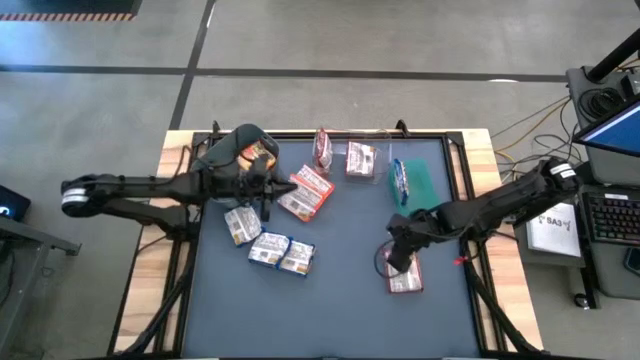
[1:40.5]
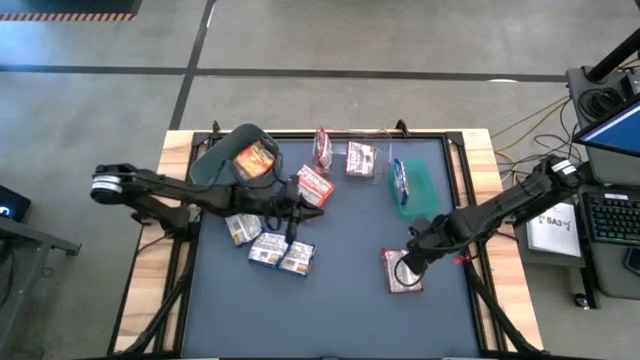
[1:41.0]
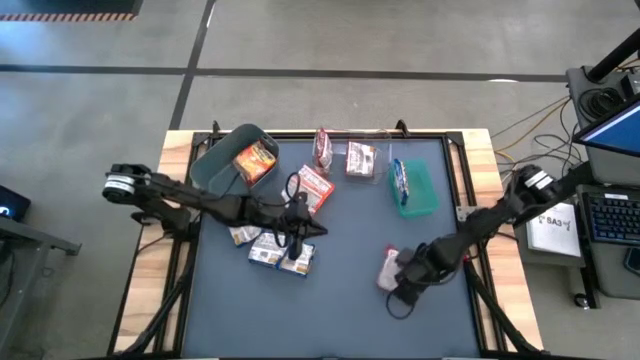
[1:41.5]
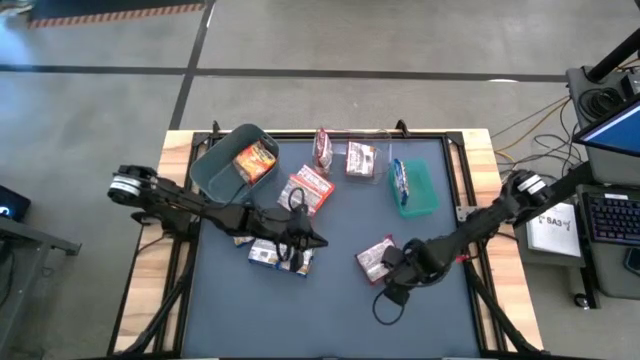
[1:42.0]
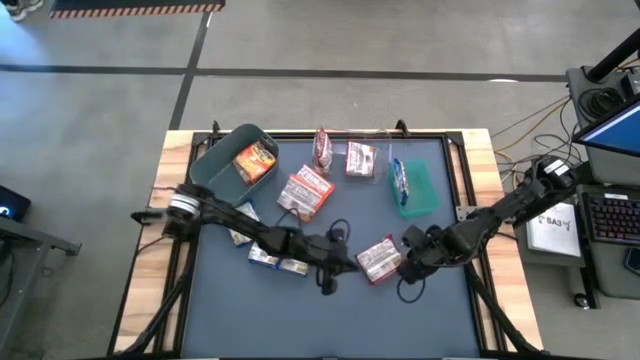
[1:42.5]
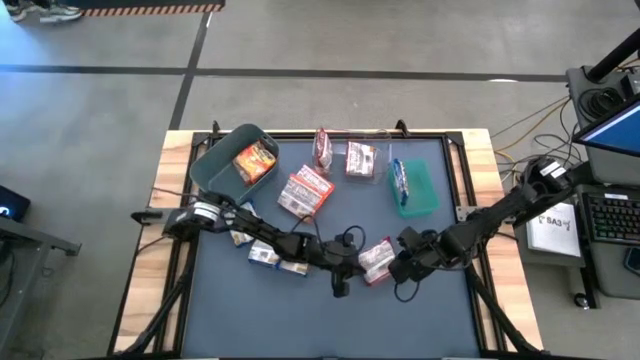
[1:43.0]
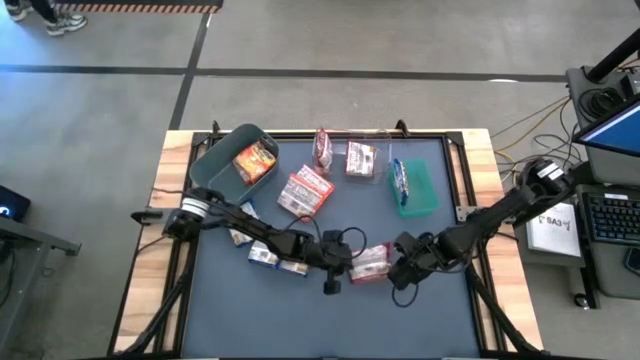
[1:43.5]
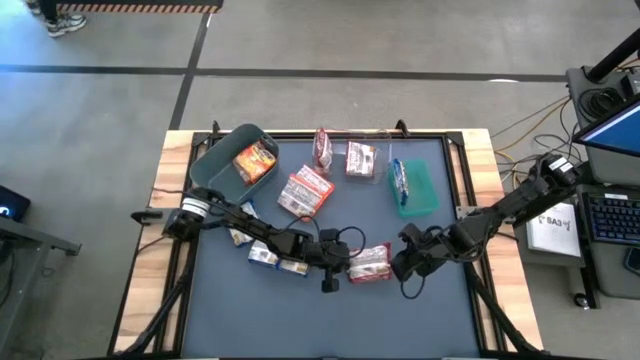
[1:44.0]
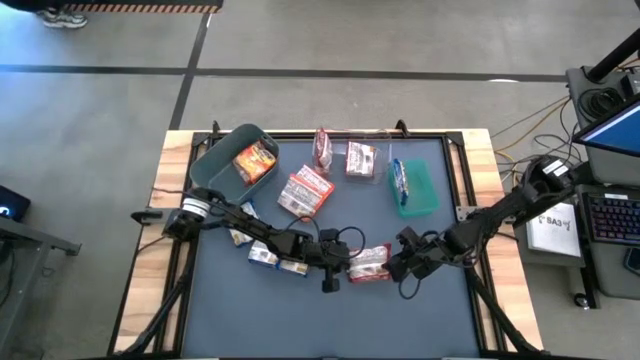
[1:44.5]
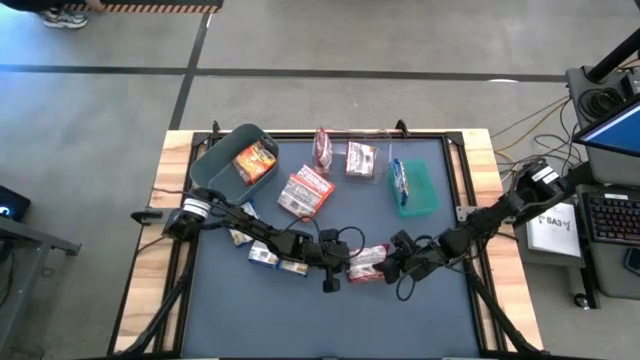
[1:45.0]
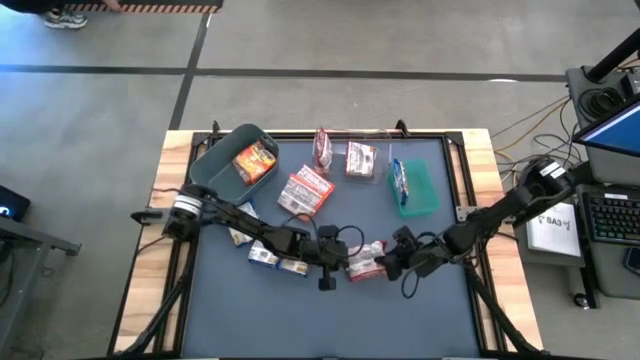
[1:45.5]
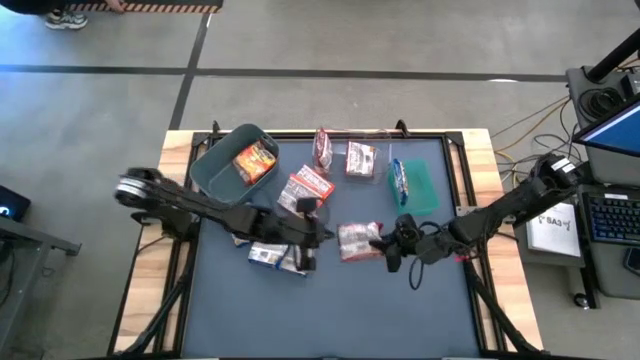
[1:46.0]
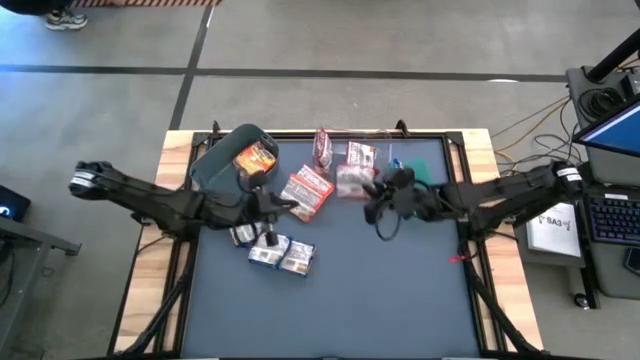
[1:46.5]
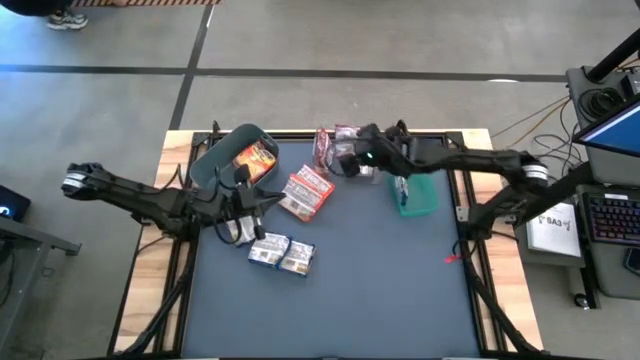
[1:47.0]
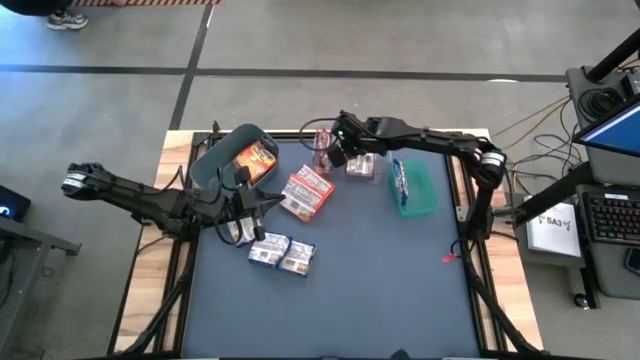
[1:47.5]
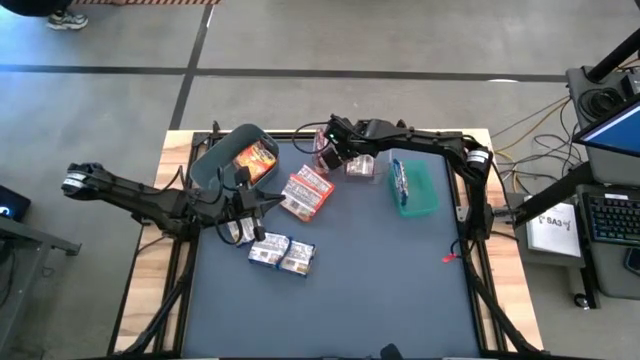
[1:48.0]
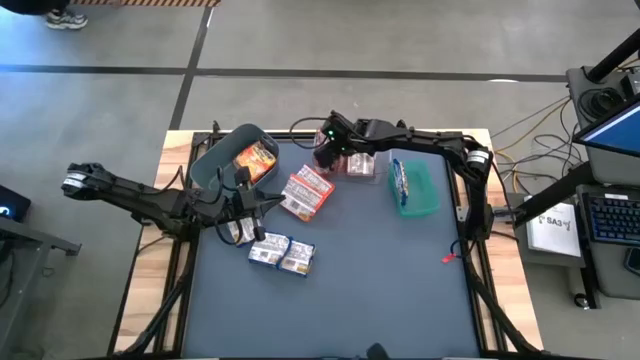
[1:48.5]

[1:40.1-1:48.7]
Task: Sort Maruchan noodles
Put the red noodle pack into the transparent bin

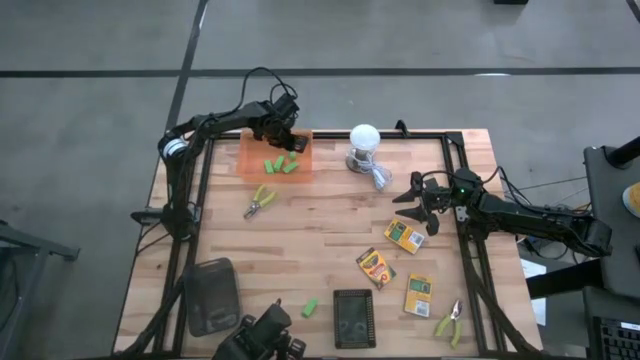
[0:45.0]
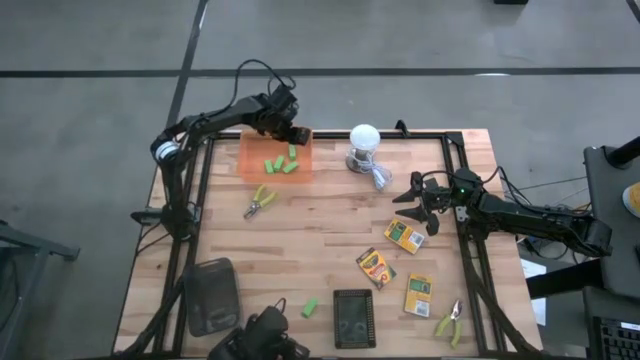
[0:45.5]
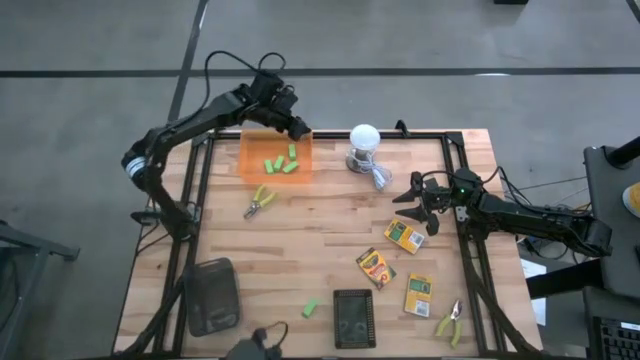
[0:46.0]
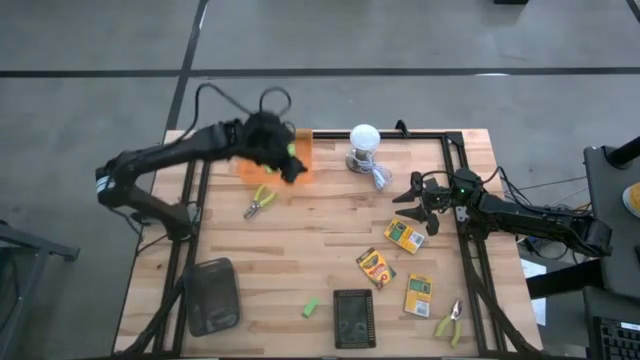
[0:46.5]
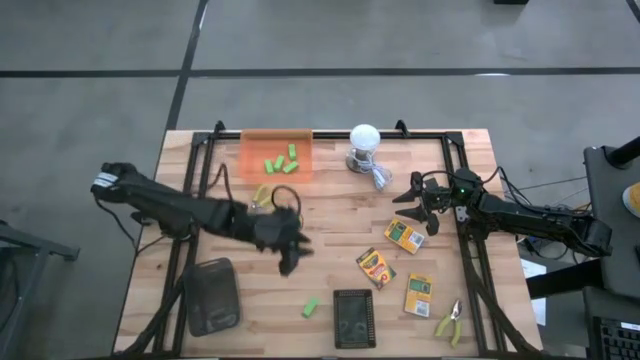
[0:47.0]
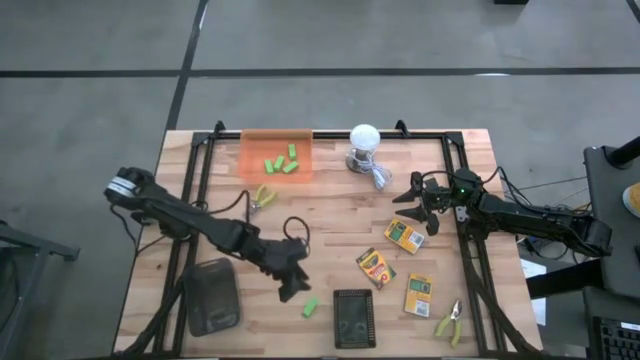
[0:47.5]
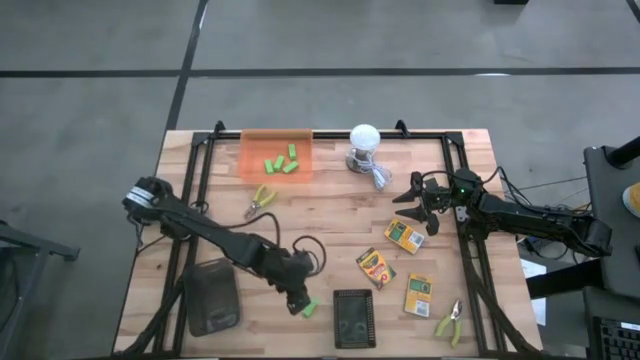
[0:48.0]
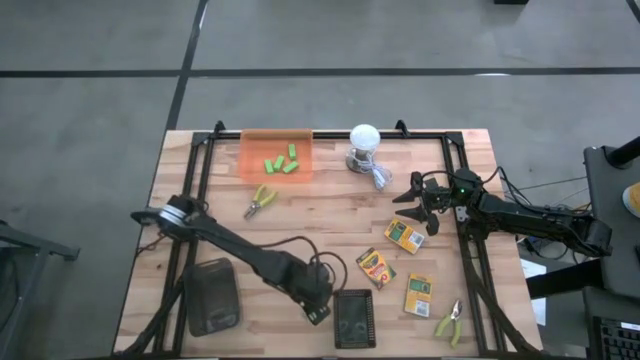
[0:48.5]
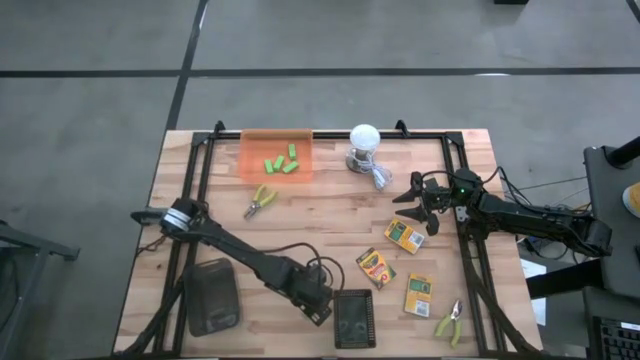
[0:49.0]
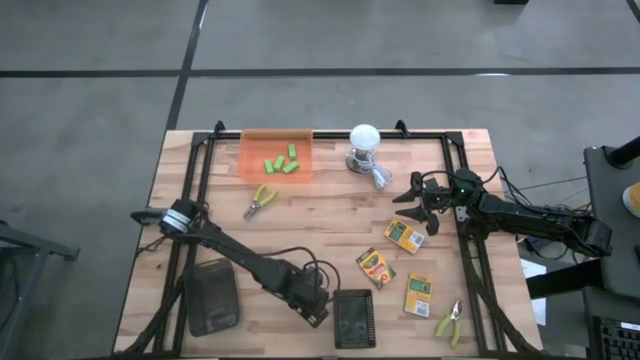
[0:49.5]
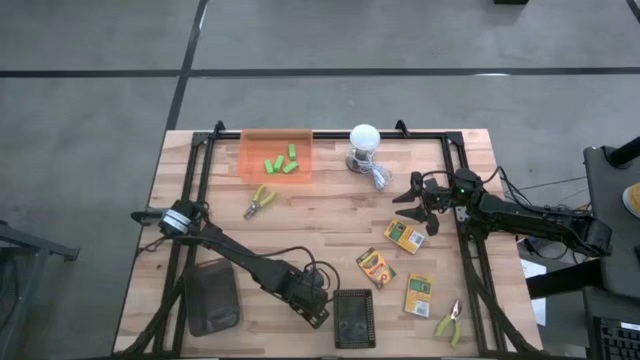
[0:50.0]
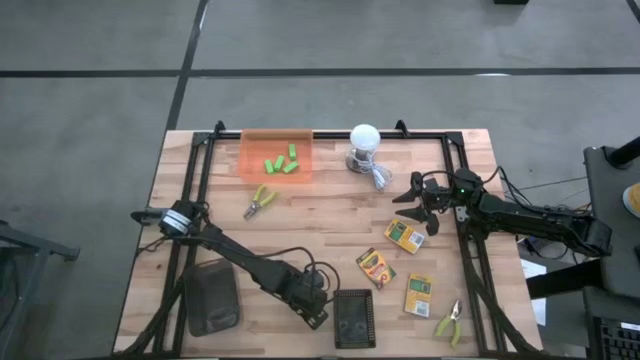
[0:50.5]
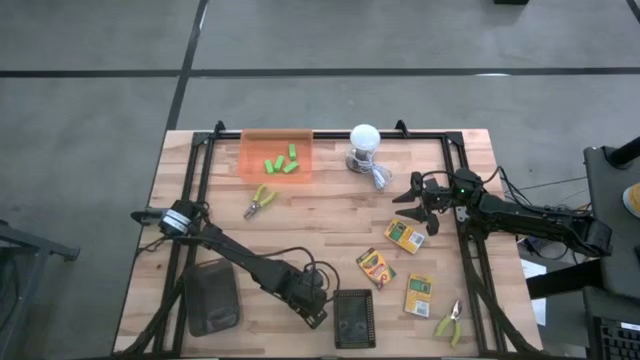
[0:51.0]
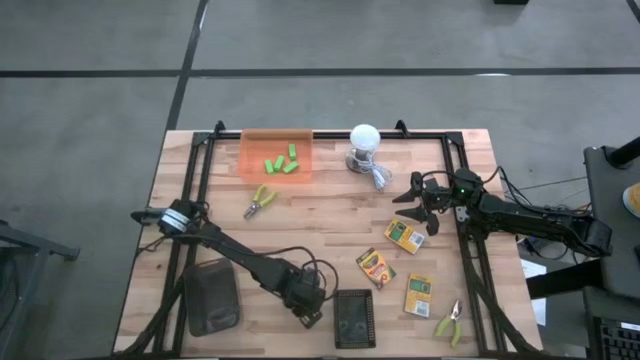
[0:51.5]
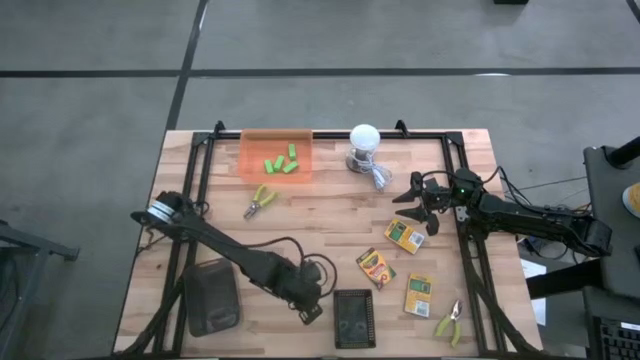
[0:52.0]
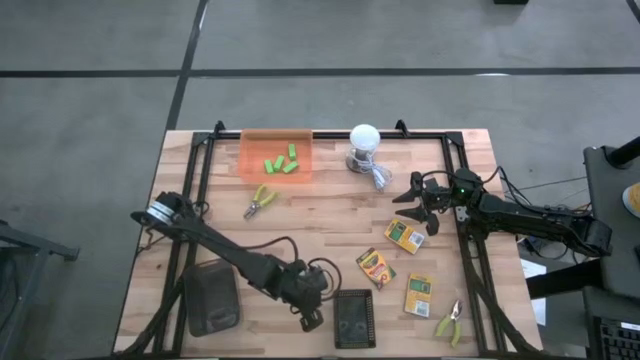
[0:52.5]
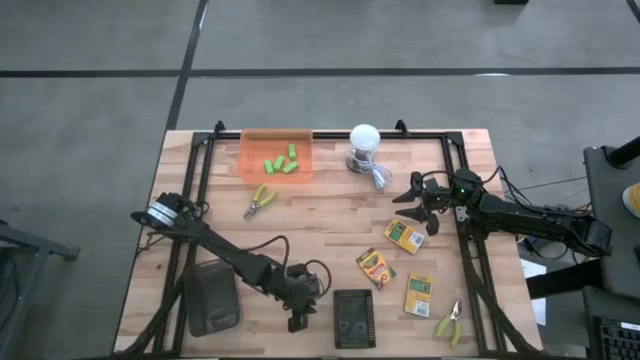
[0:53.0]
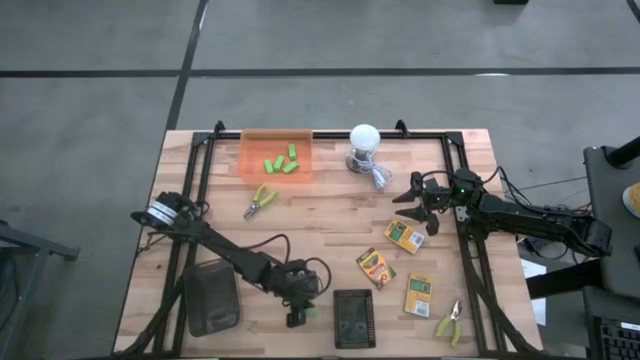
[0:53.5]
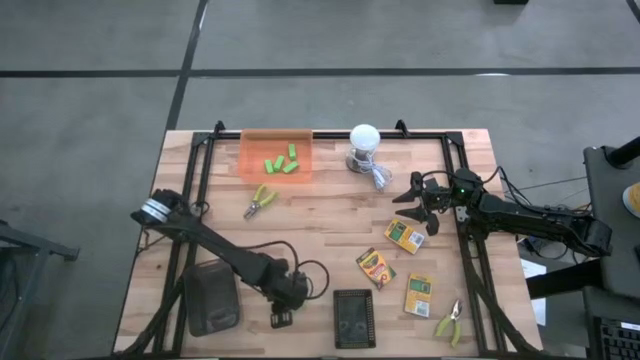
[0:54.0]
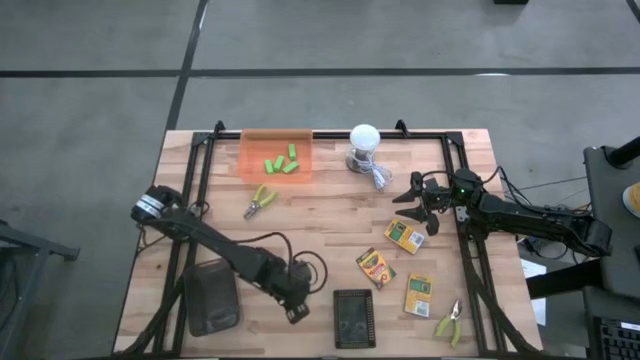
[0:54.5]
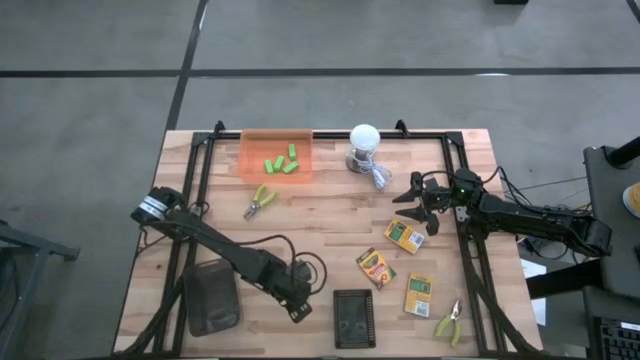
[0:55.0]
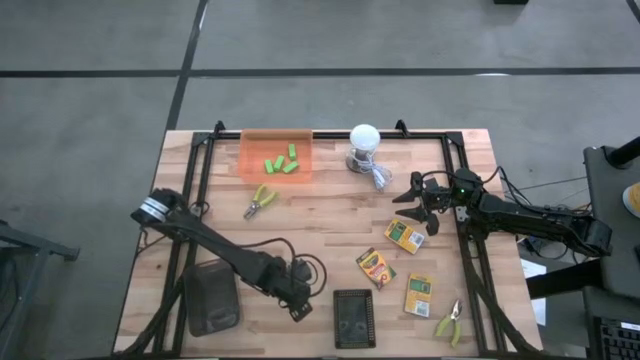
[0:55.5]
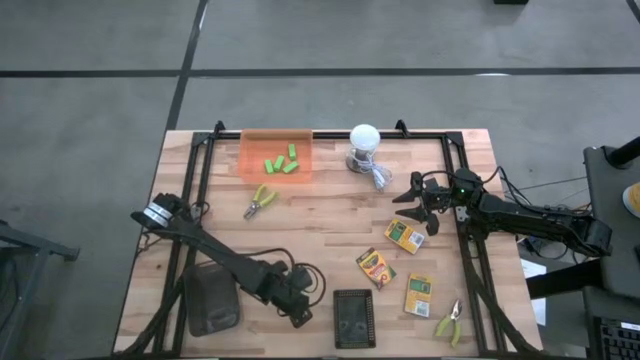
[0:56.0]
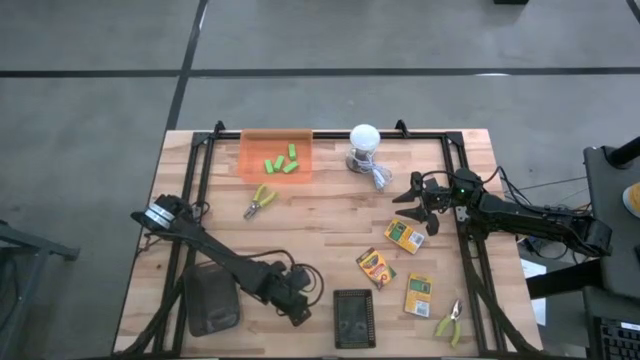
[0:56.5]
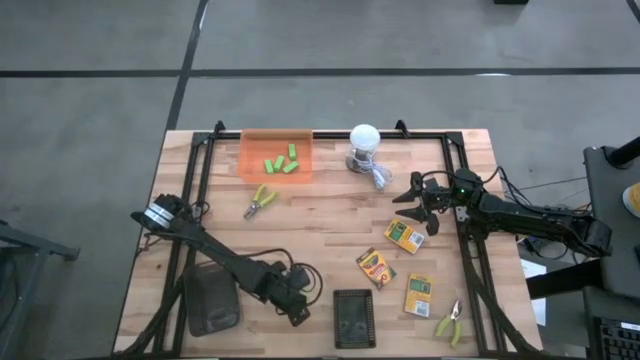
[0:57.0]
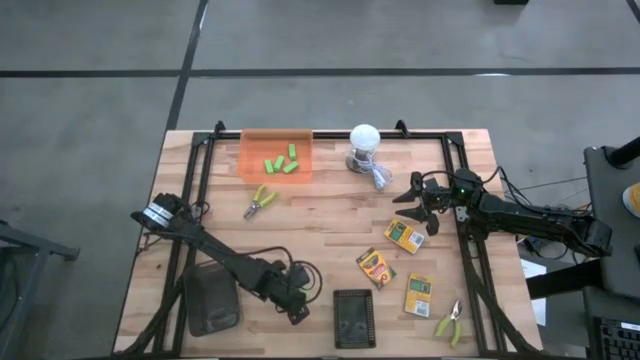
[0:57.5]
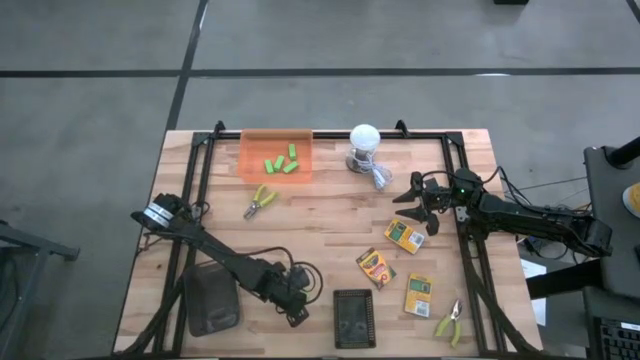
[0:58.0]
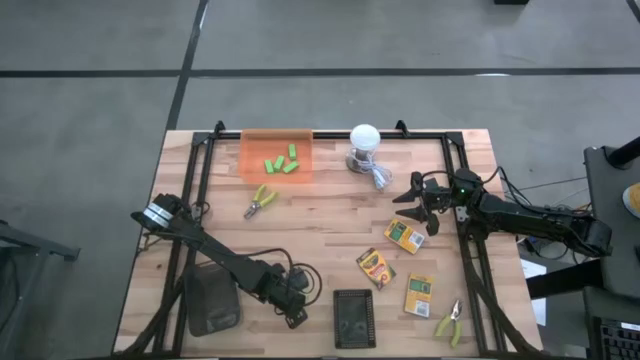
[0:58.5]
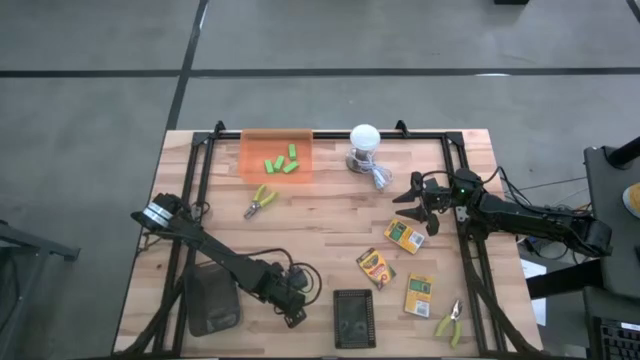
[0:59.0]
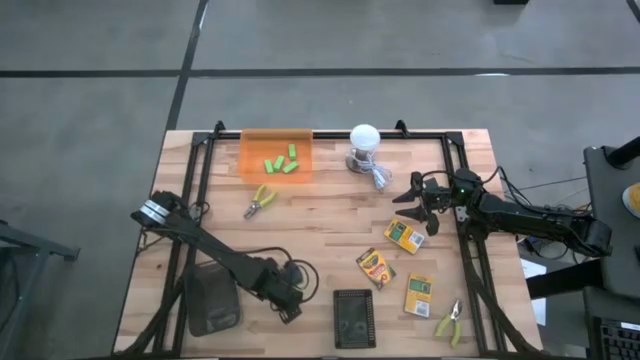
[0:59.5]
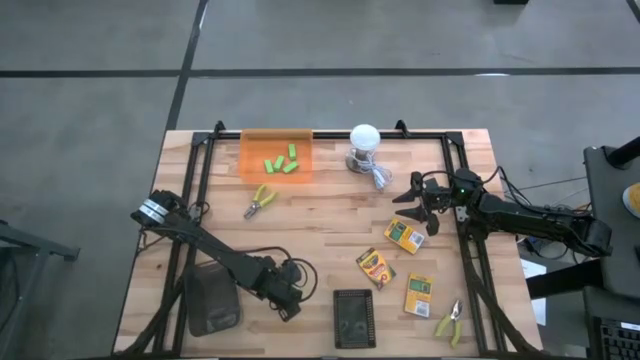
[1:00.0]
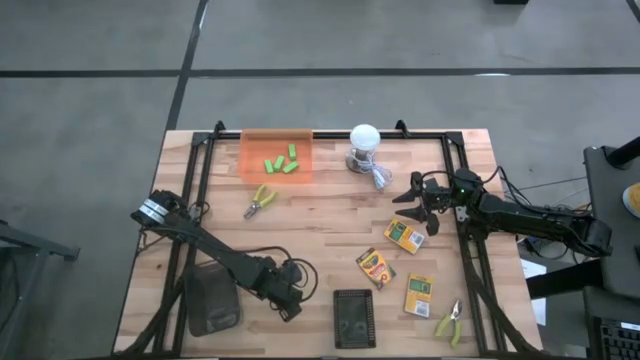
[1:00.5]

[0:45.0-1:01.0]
Task: Pick & Place School Supplies
Put the green eraser into the orange bin
